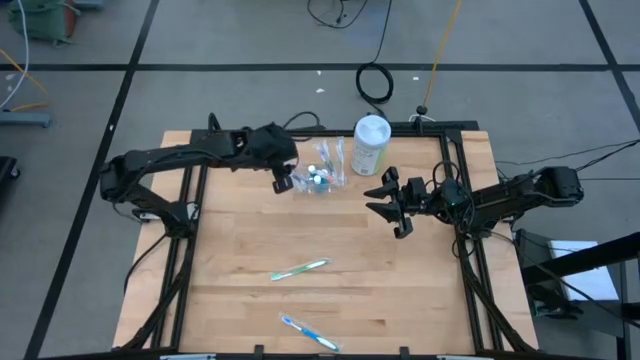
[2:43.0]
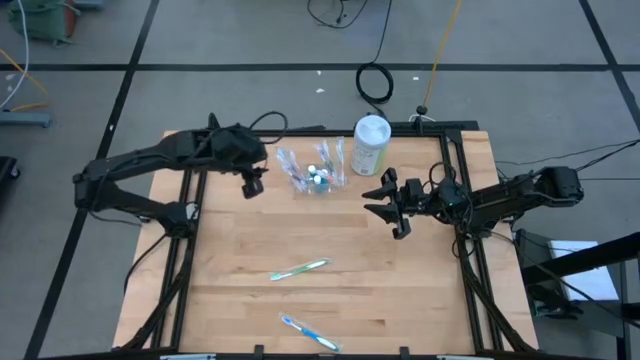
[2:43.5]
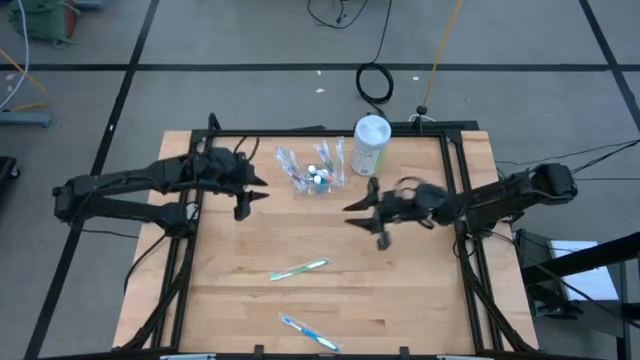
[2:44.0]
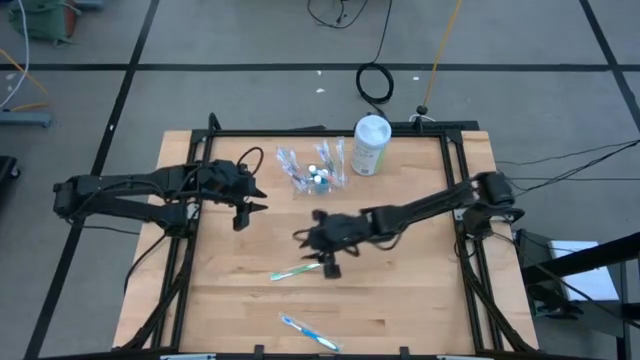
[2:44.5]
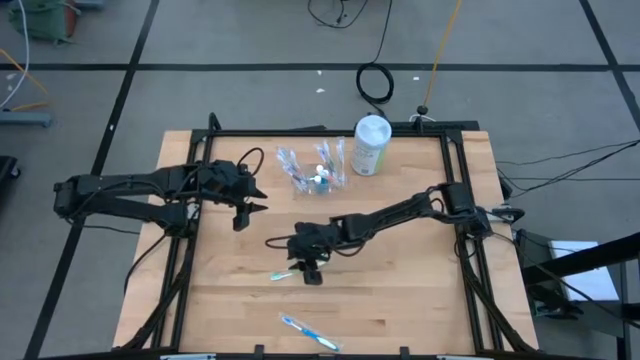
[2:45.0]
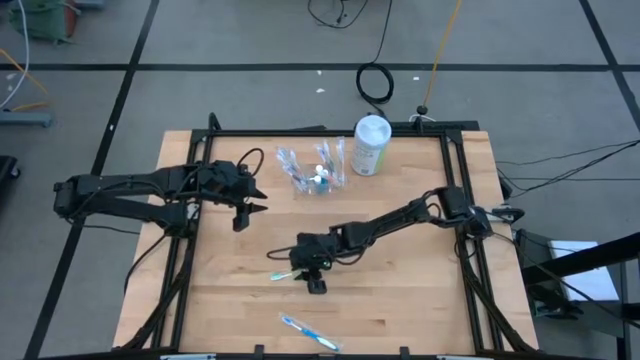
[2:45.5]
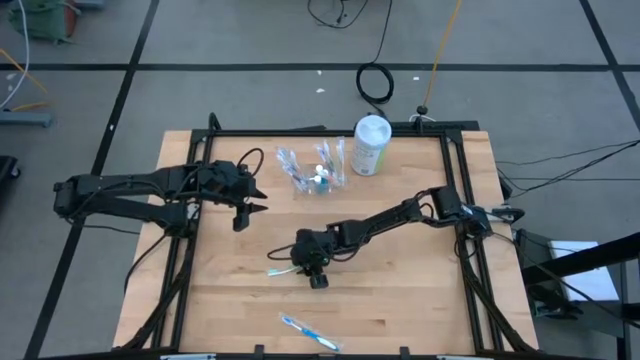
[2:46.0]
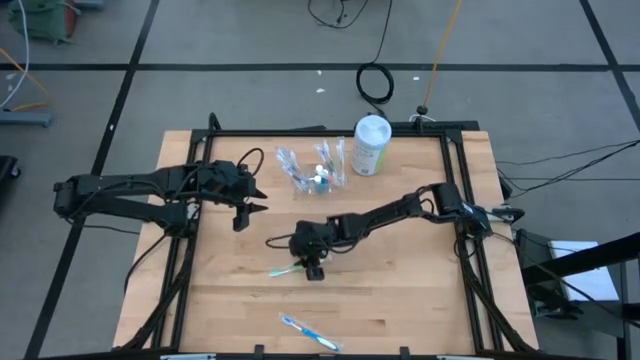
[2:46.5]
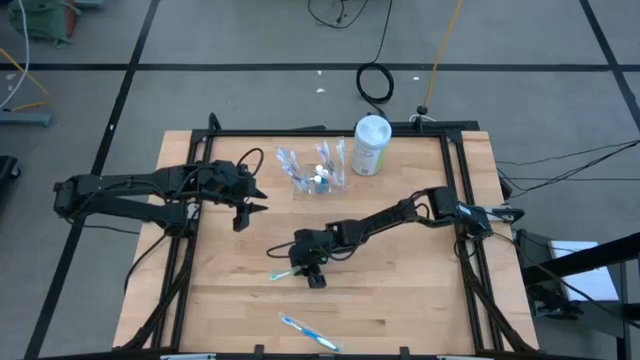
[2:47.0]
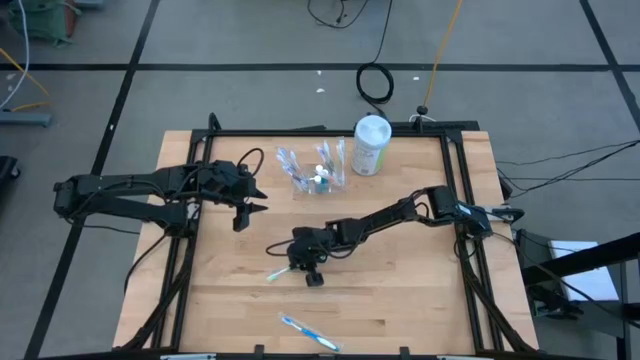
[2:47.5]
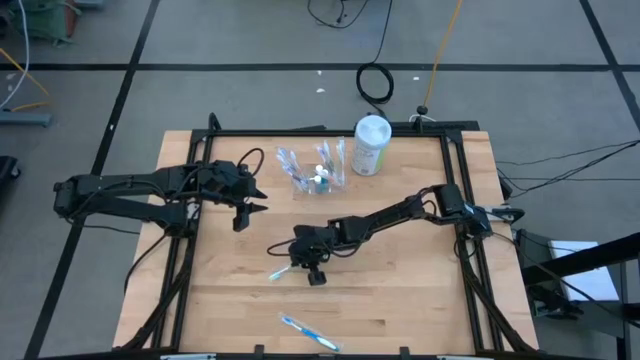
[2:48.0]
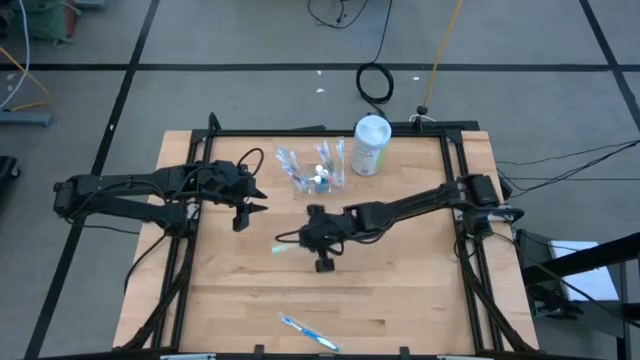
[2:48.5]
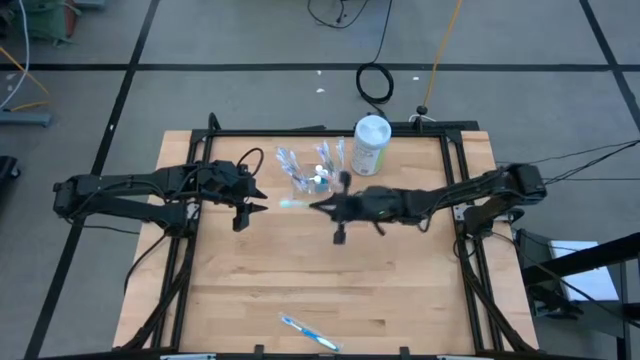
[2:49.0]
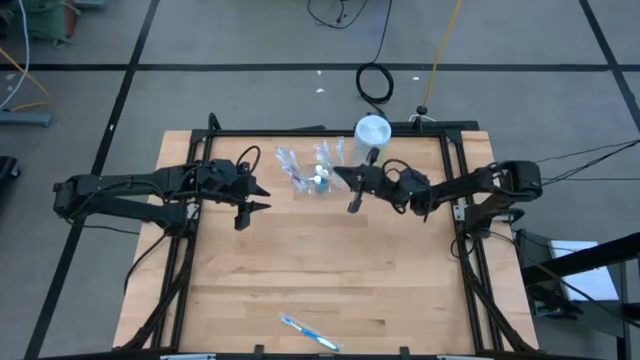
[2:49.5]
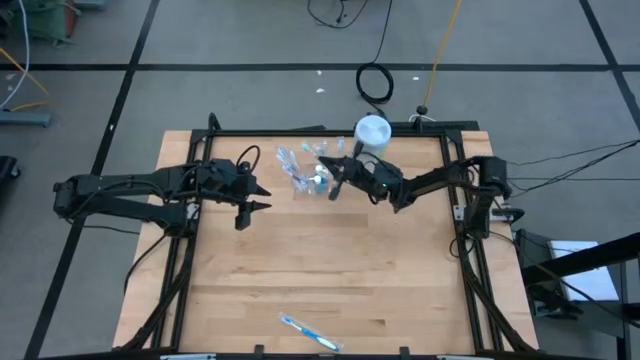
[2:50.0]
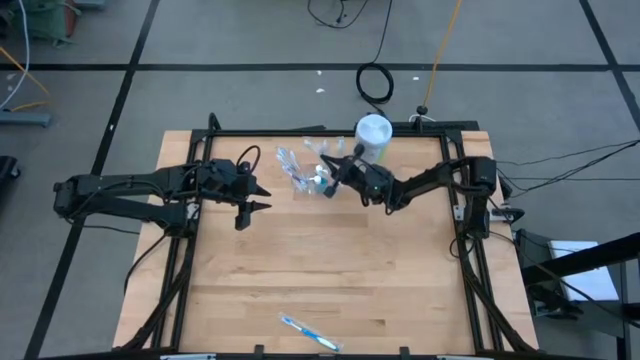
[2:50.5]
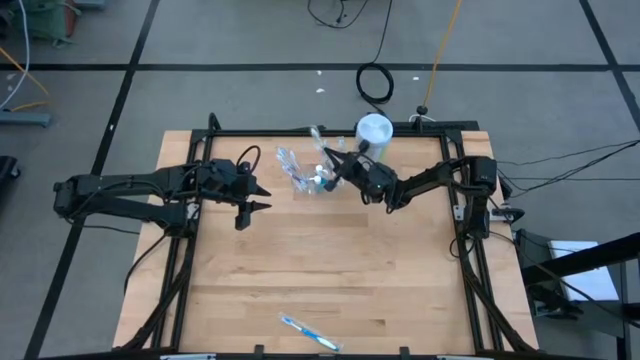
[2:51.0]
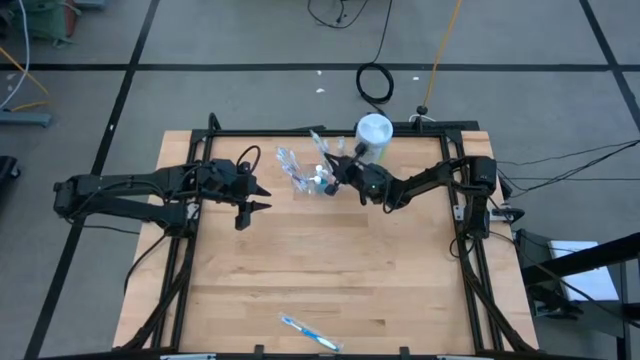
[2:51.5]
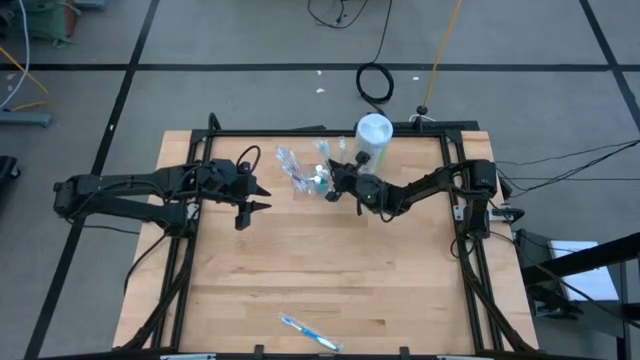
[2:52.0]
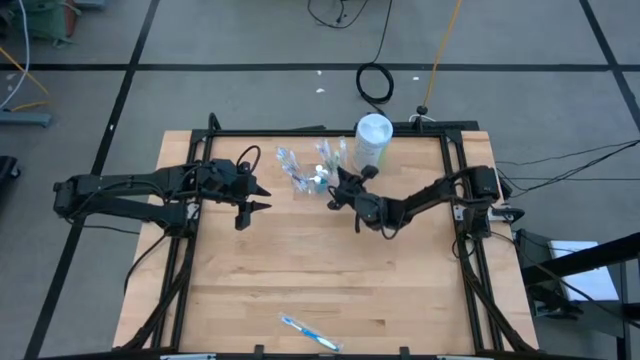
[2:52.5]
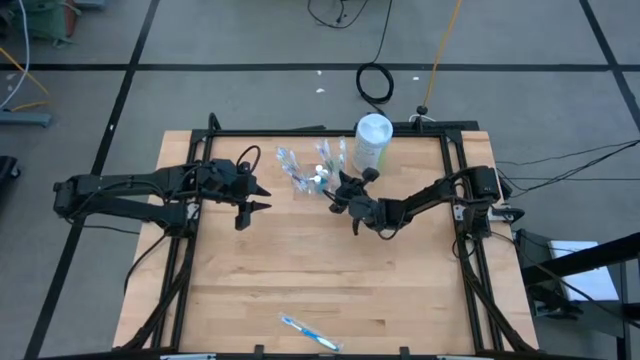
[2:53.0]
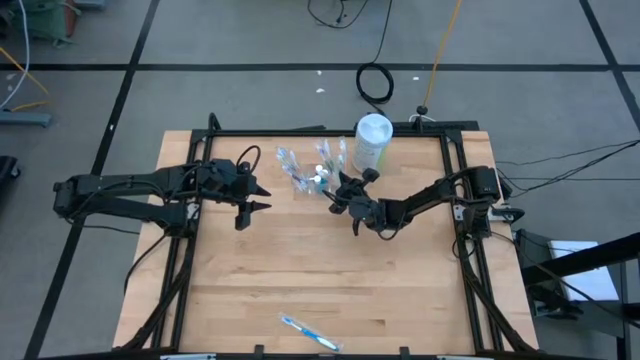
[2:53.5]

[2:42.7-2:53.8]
Task: Pick & Place toothbrushing station
Put the green toothbrush into the transparent organizer

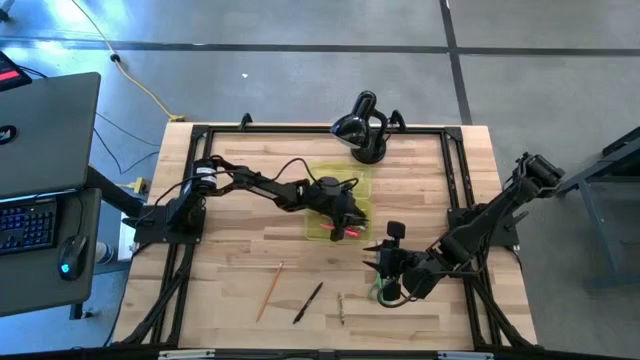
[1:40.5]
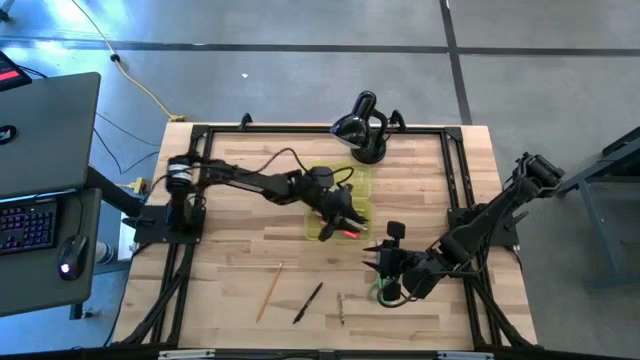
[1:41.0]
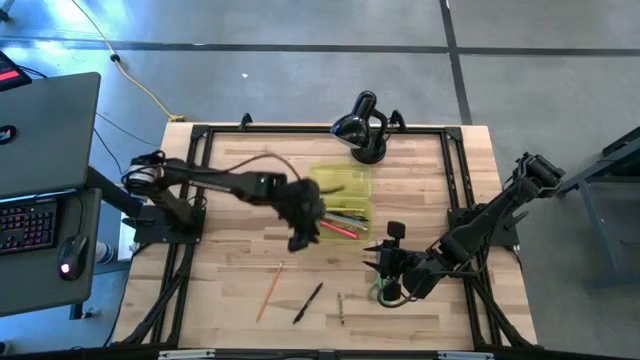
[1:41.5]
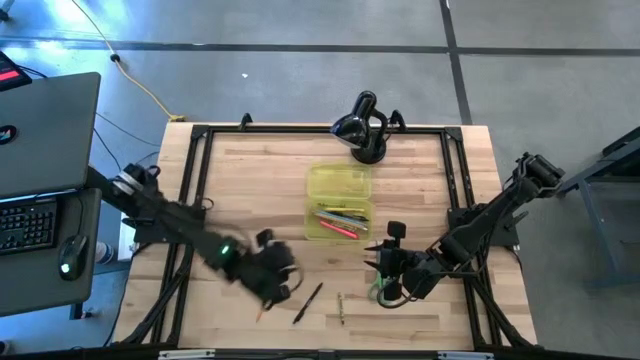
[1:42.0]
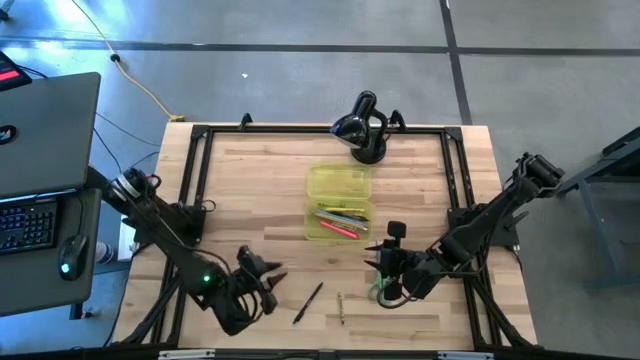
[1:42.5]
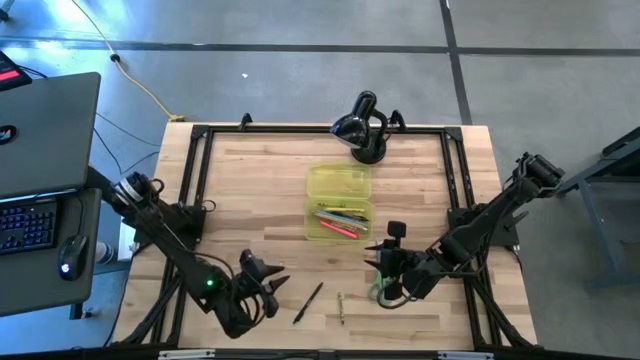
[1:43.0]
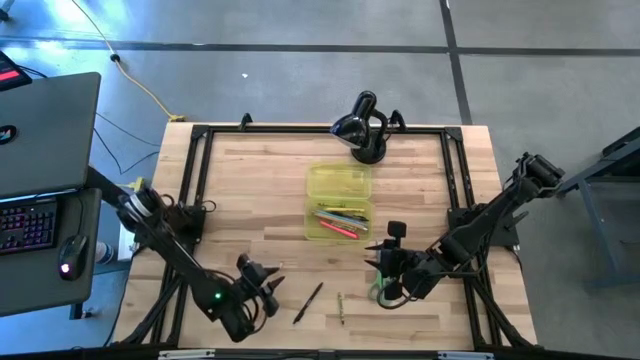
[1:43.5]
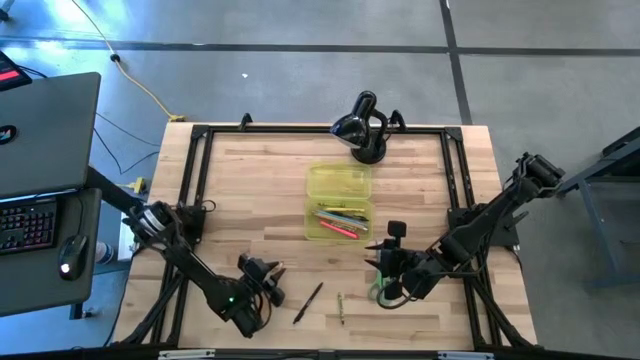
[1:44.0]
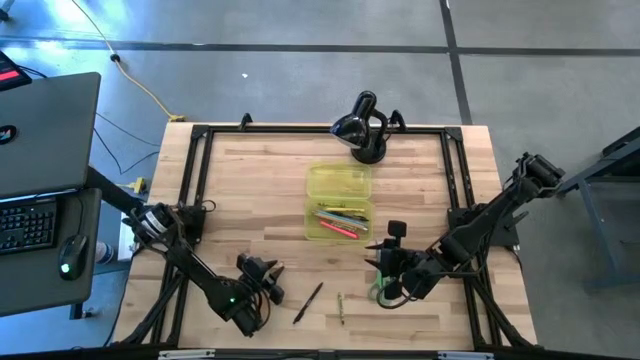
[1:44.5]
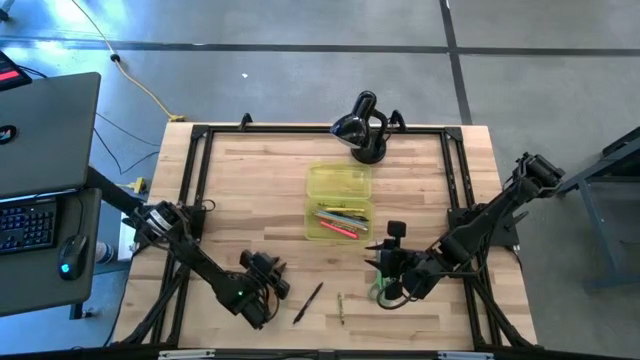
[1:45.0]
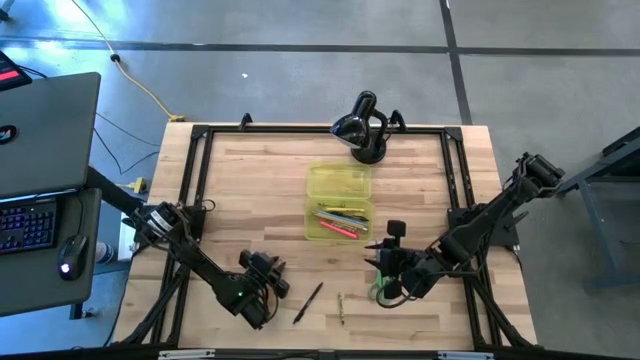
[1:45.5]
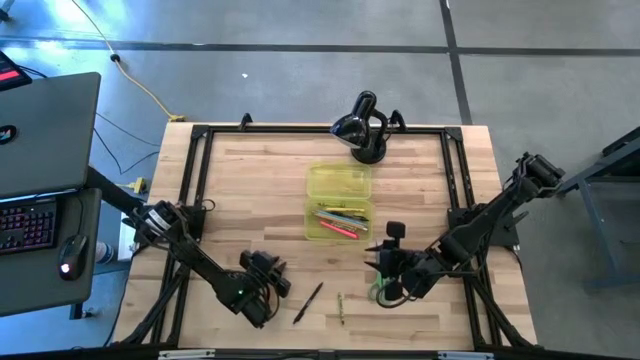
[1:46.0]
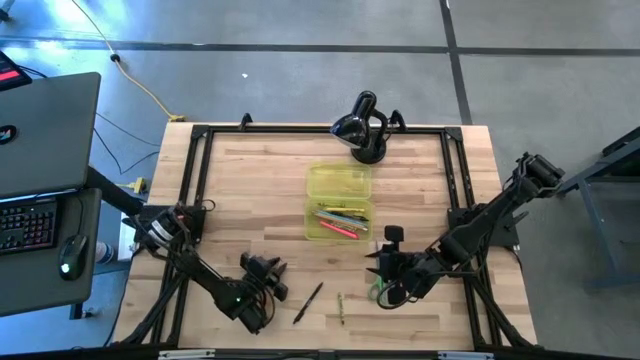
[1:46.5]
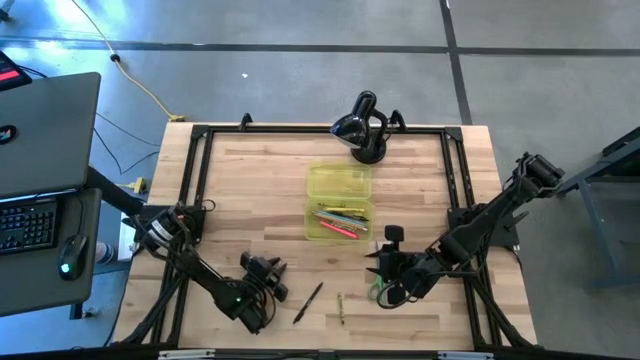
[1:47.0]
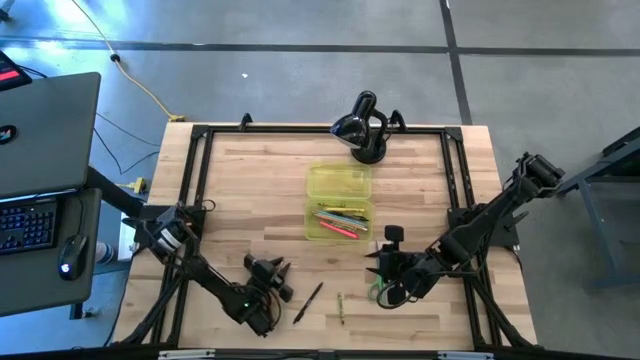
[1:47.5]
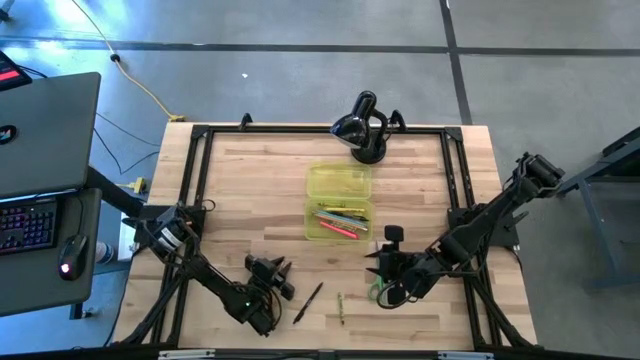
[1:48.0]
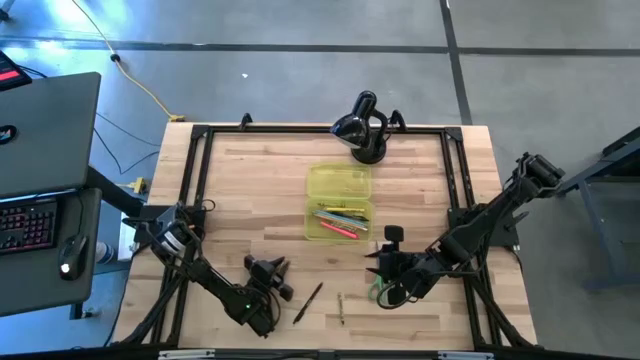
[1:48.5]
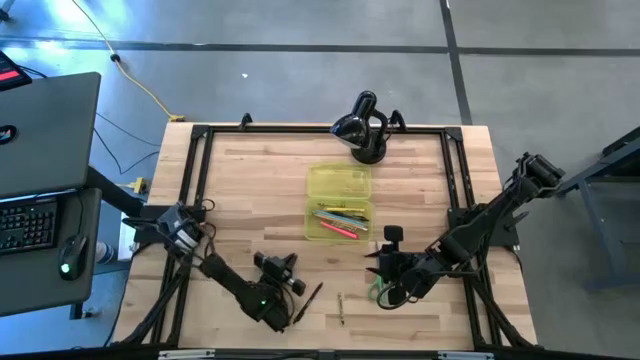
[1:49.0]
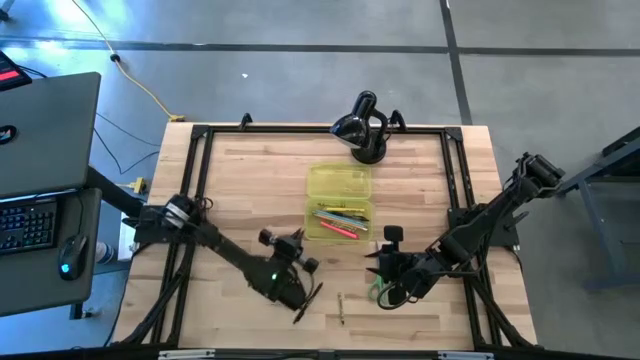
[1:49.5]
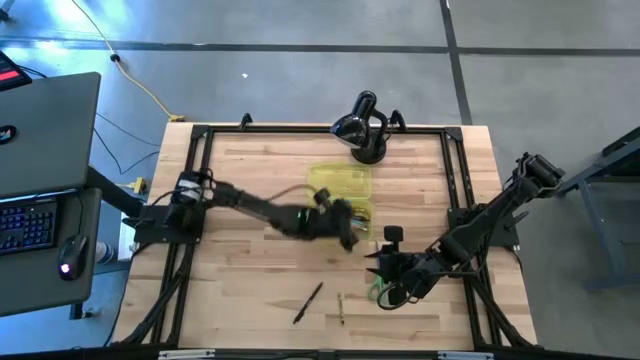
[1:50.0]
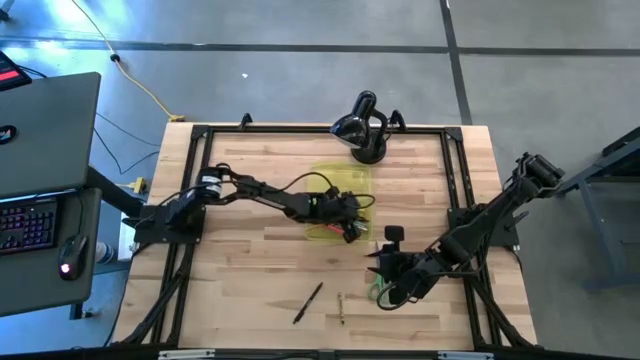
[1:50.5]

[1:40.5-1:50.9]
Task: Pick & place school supplies into a supply box
Put the orange pencil in to the yellow school supply box

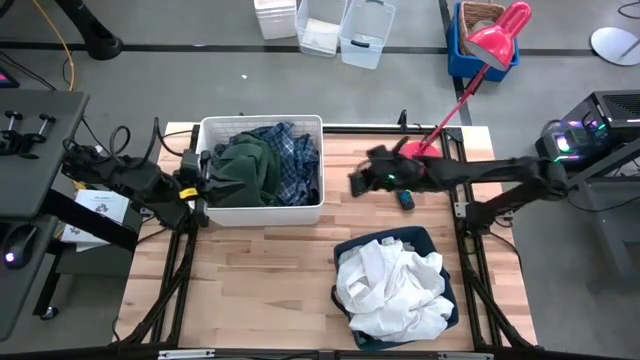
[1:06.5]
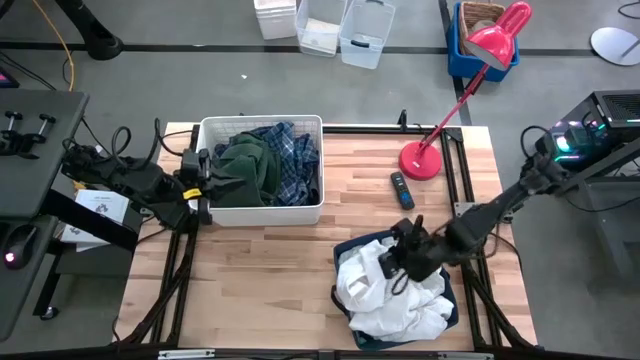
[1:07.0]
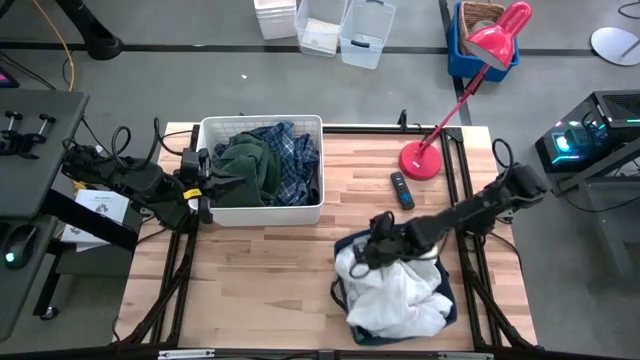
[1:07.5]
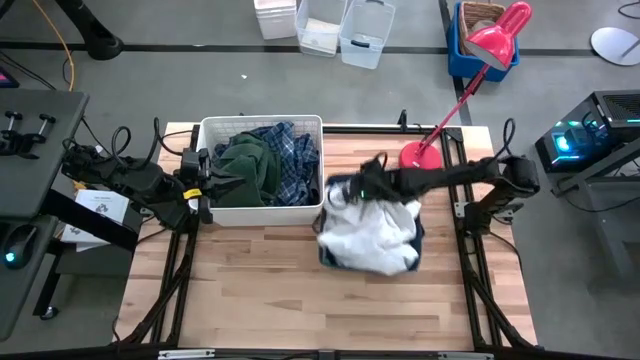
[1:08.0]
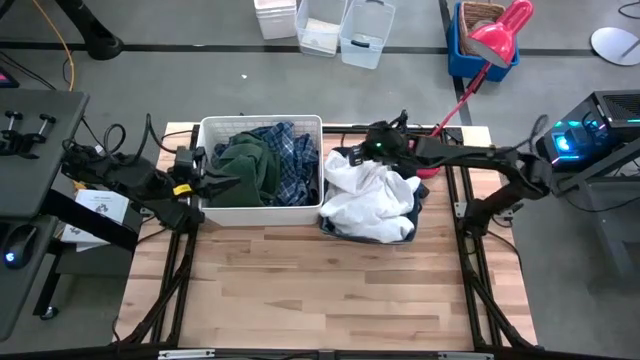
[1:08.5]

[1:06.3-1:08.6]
Task: Sort clothes
Move the blue laundry bin to the right of the white laundry bin
